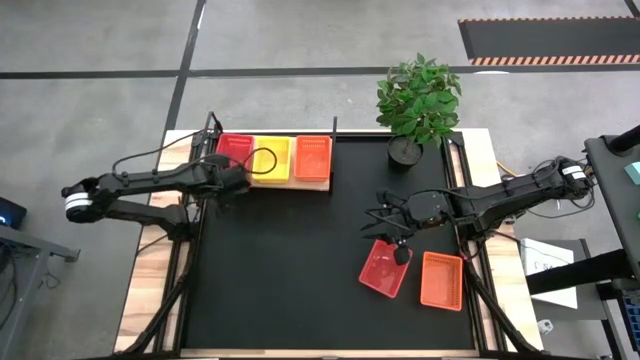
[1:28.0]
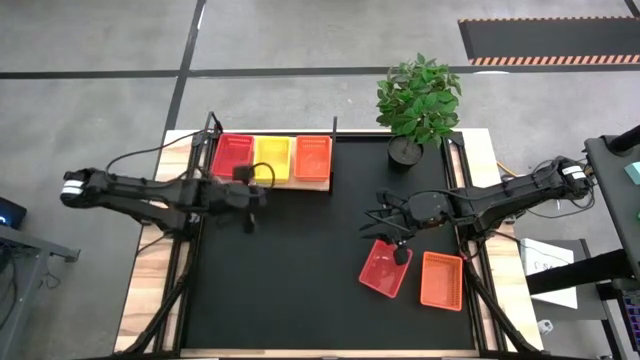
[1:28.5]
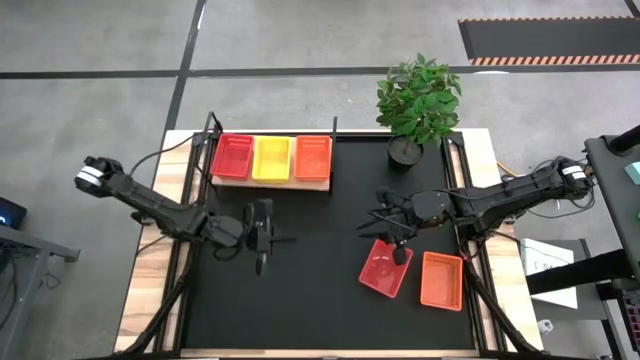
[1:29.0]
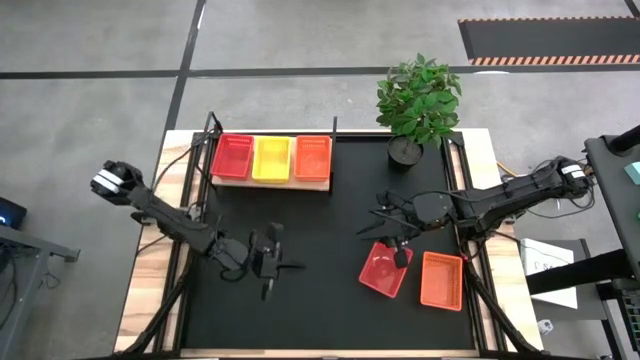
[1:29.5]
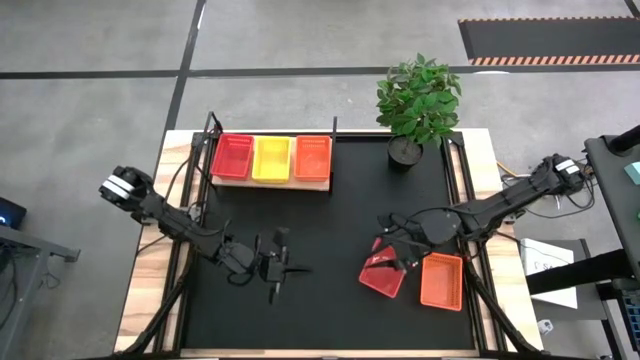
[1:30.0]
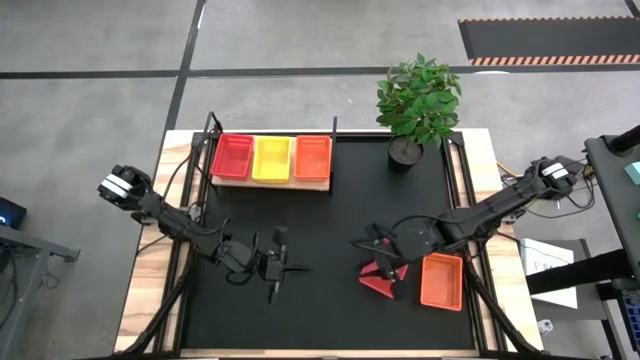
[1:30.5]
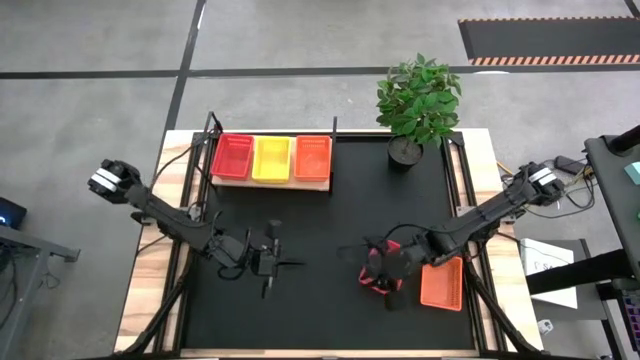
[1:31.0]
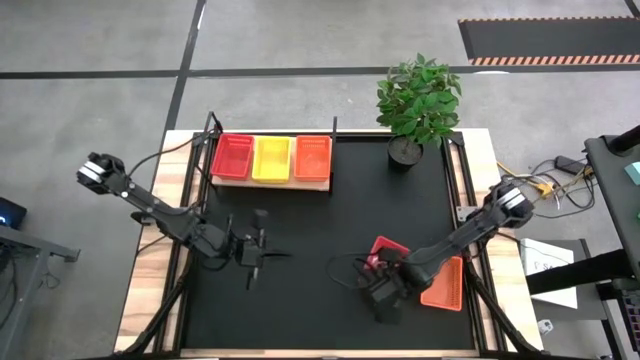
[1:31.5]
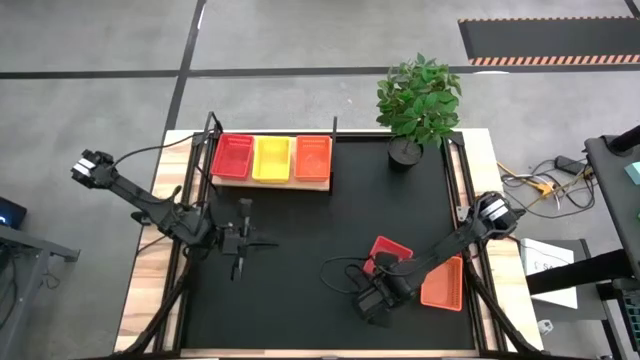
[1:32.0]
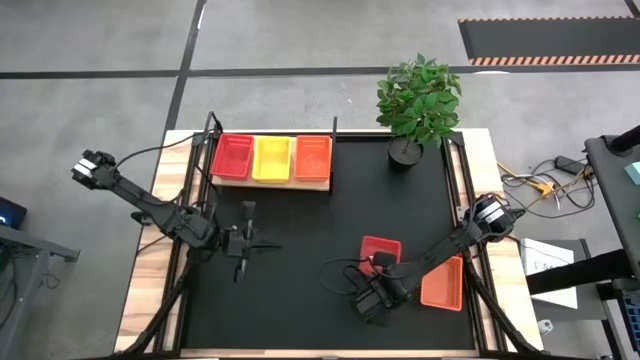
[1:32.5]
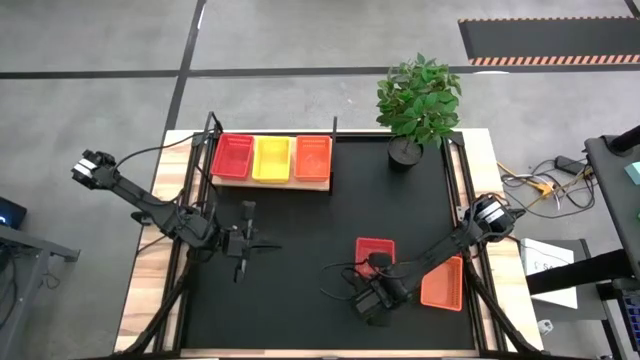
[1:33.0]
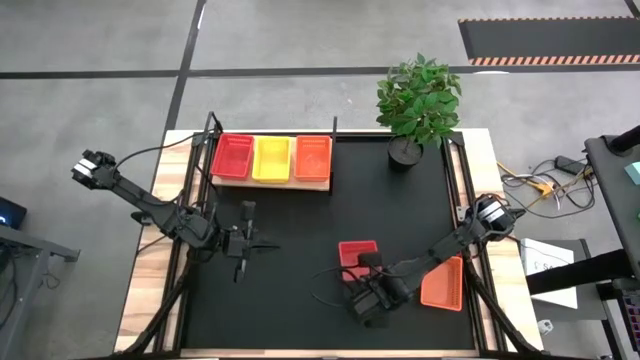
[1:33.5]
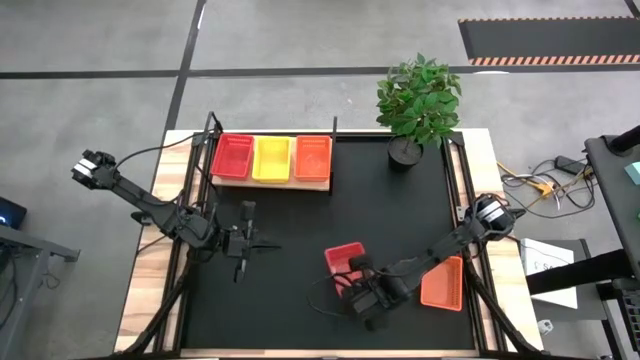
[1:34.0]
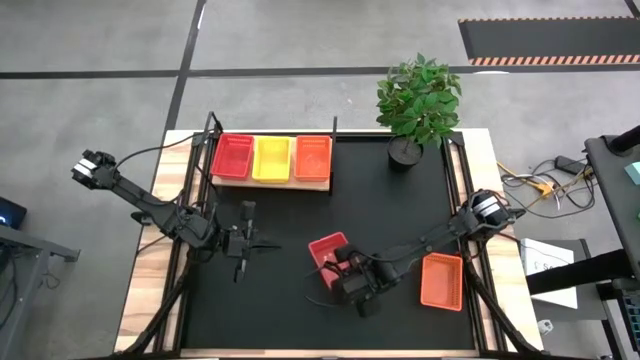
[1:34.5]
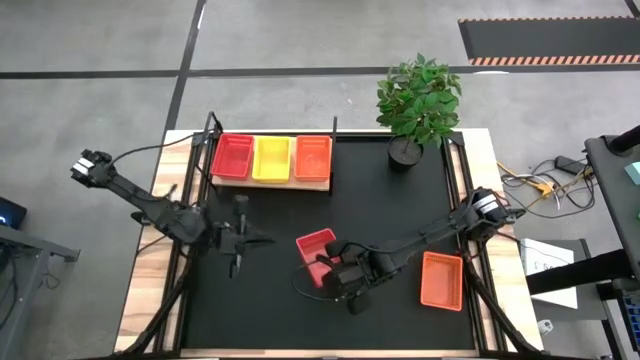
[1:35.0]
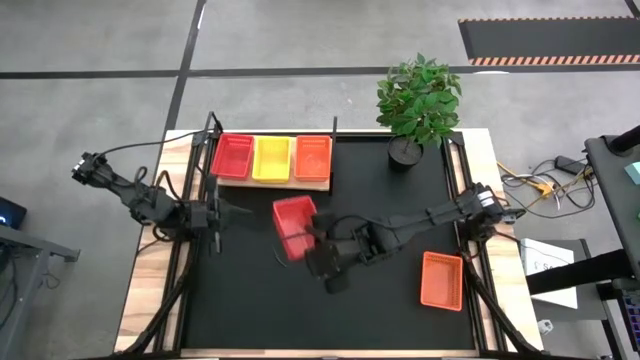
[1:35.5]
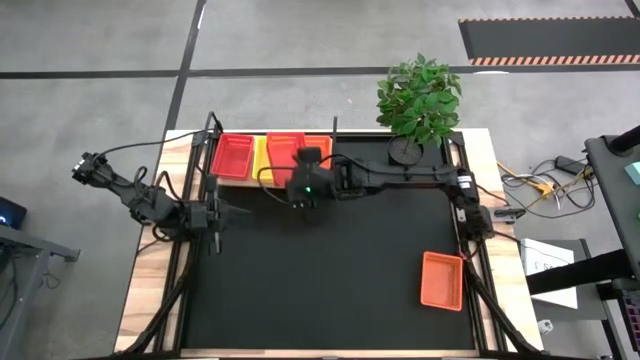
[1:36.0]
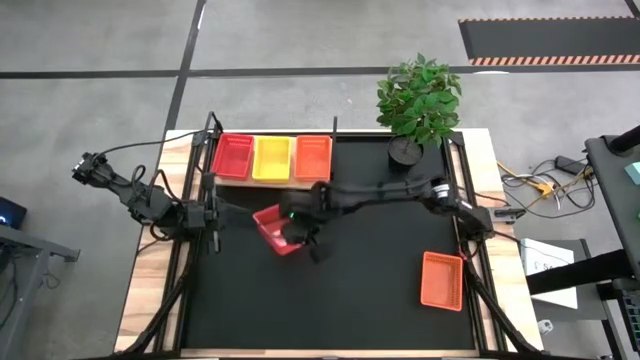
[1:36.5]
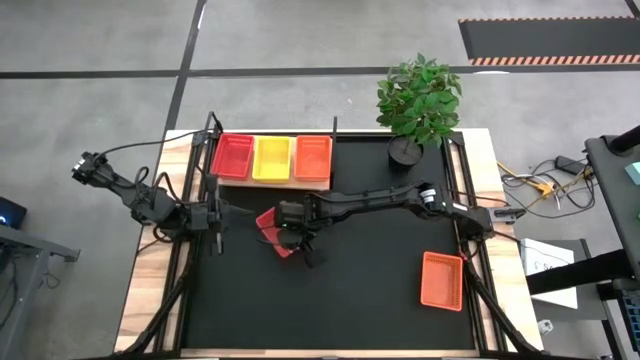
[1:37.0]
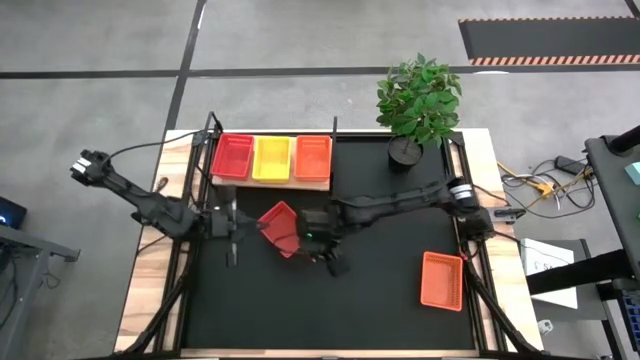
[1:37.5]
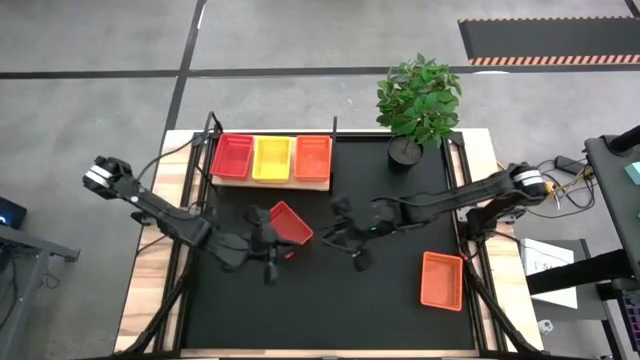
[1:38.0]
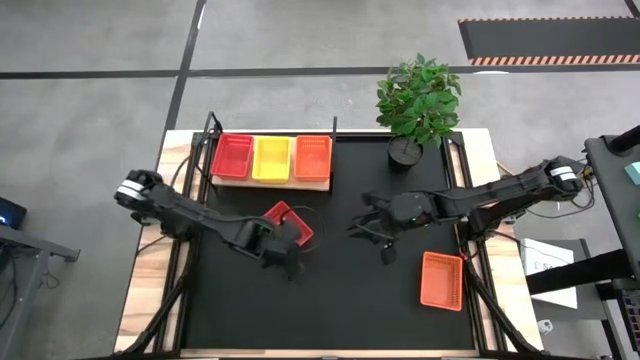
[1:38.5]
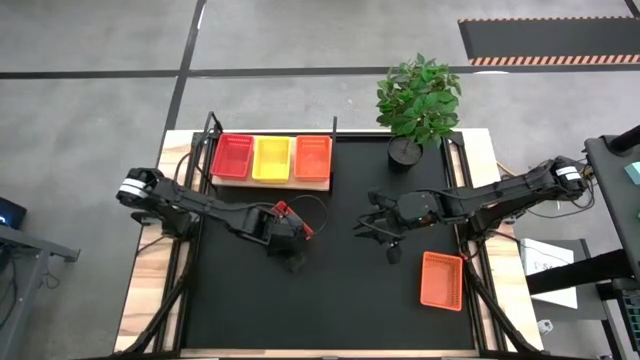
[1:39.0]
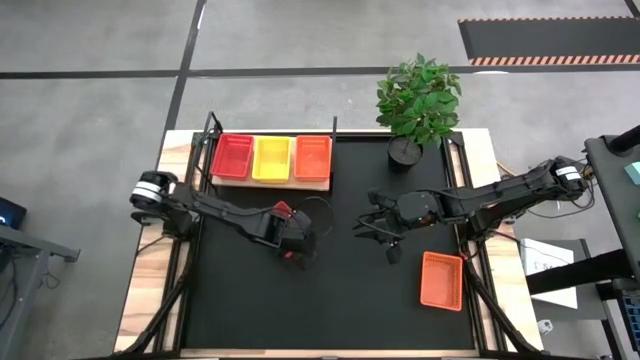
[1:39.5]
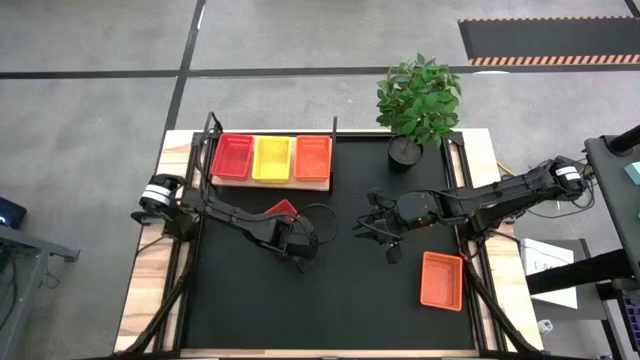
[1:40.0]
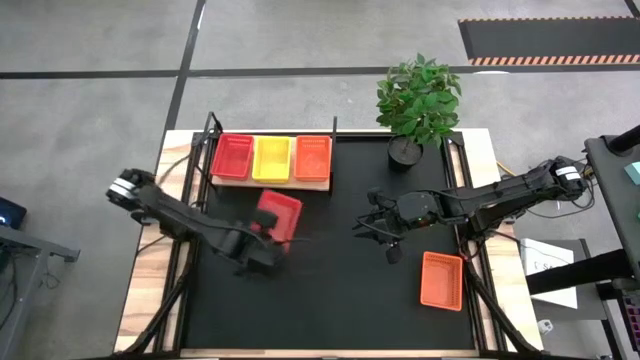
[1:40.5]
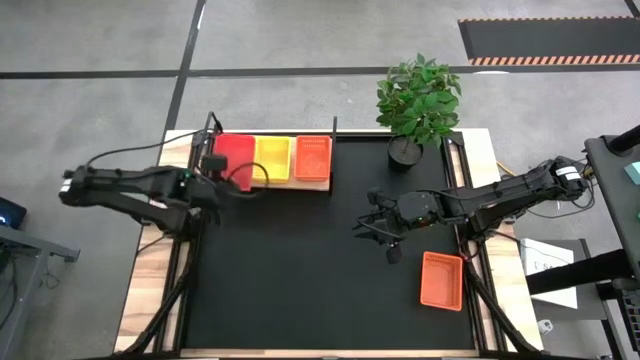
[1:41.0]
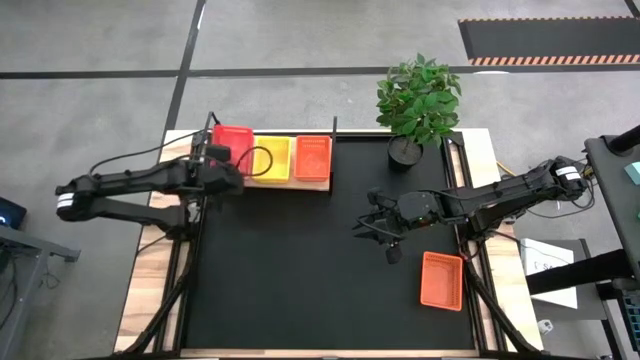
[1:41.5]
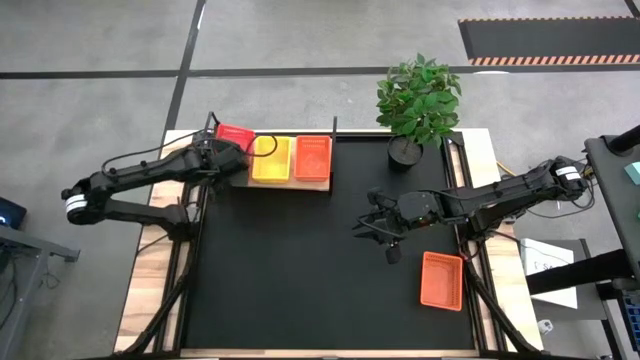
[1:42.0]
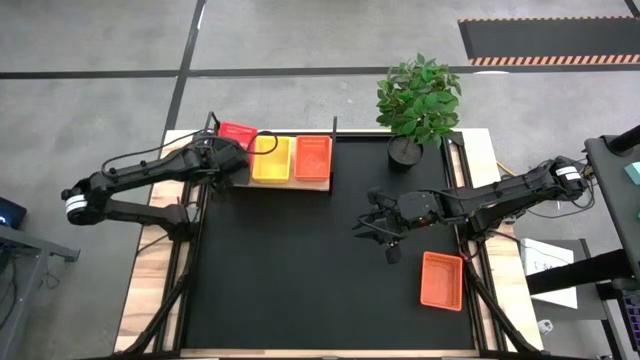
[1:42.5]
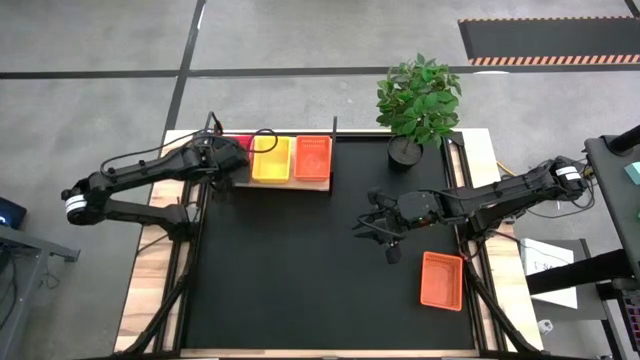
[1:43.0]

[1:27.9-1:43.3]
Task: Stack baskets on shelf by color
Stack the red bin on top of the other red bins on the shelf

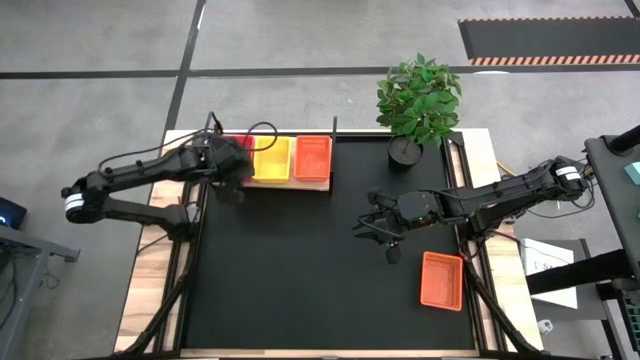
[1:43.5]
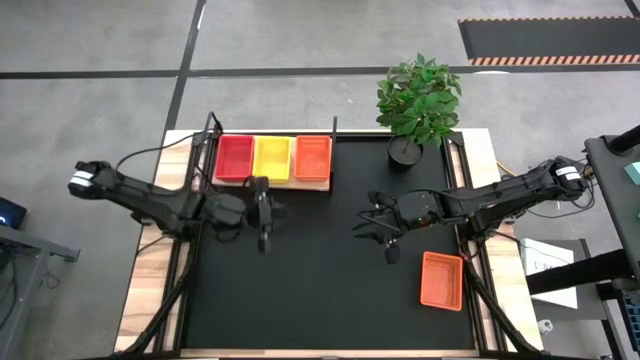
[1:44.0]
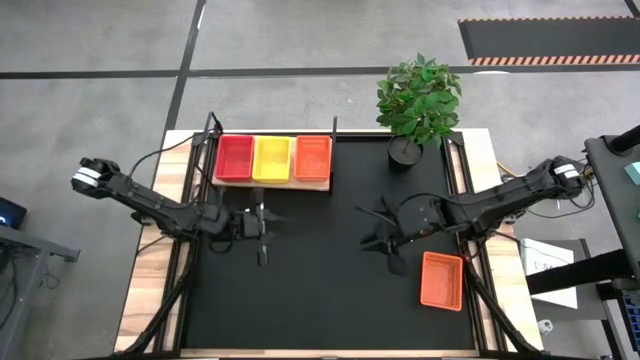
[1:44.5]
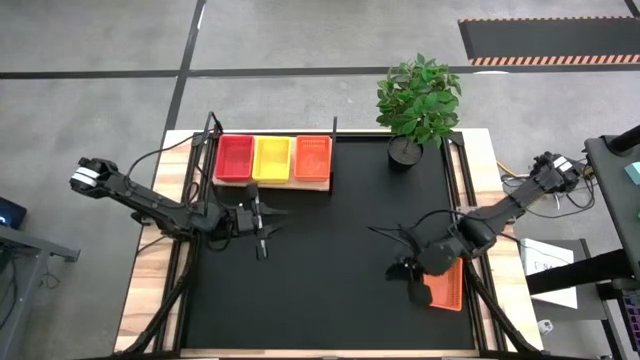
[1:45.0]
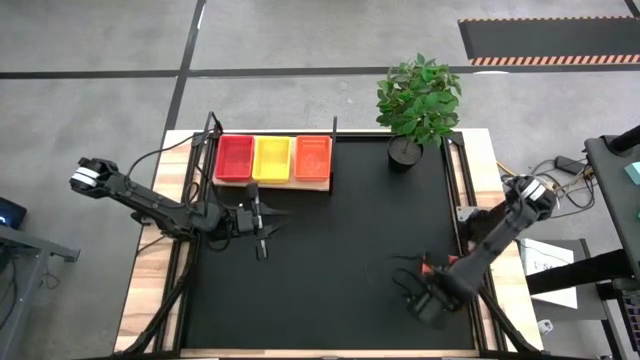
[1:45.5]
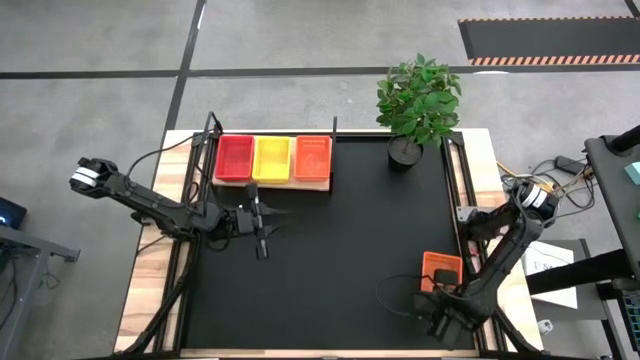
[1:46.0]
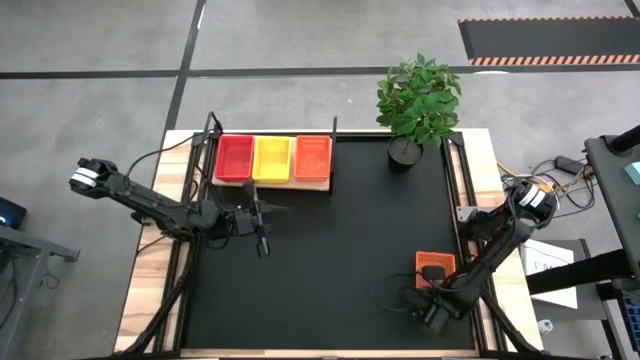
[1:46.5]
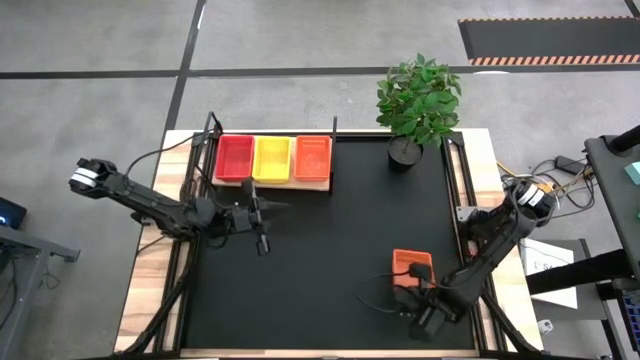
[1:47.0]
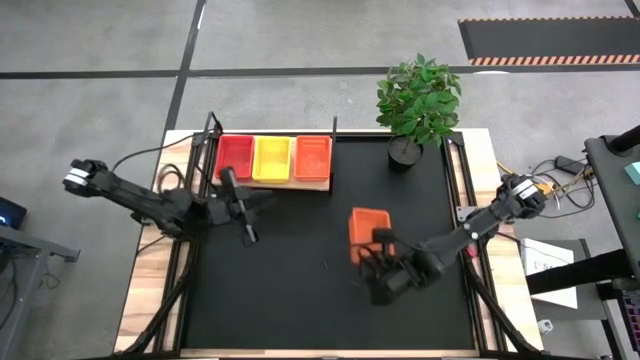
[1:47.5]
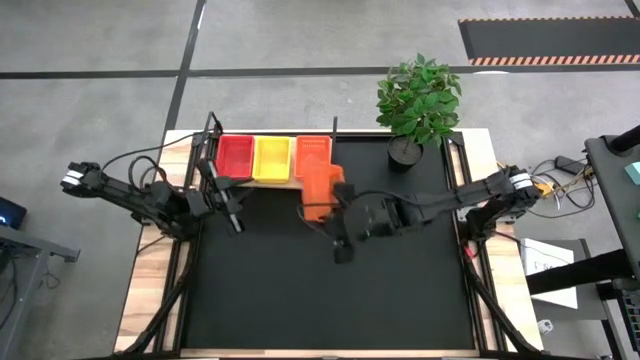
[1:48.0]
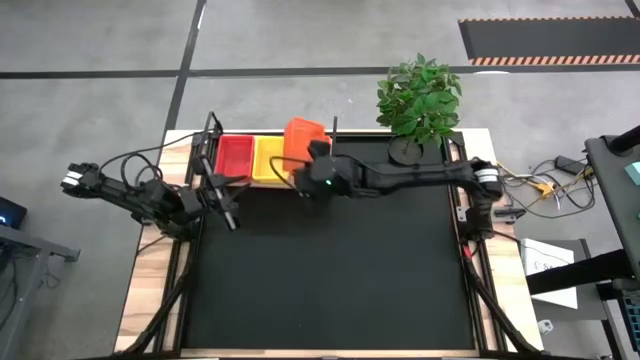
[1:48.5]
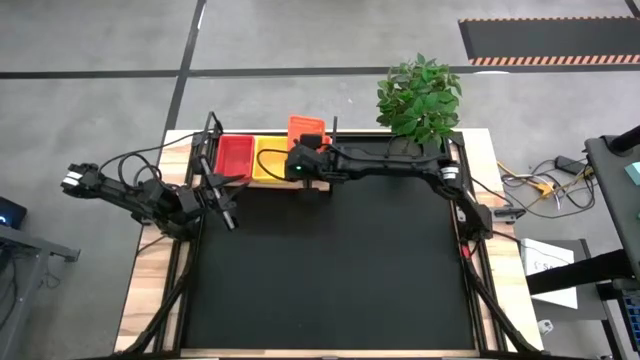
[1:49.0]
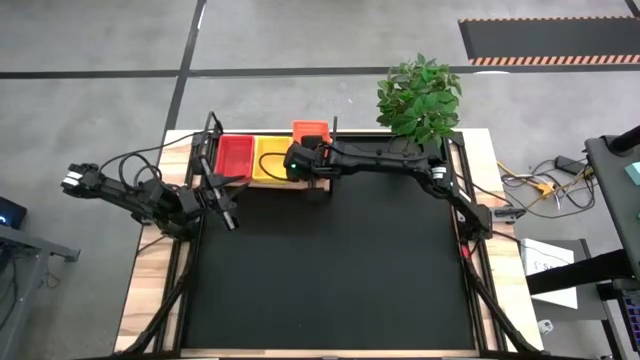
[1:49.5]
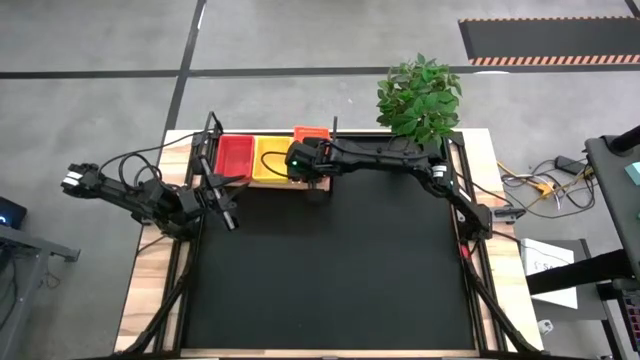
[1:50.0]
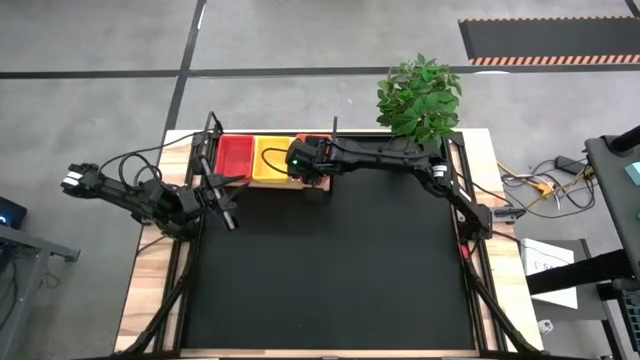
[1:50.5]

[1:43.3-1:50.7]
Stack the orange bin on top of the other orange bins on the shelf
